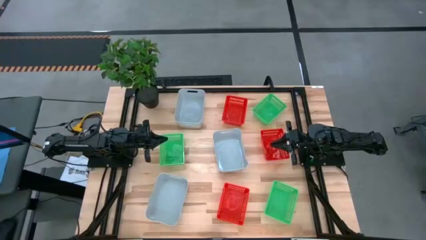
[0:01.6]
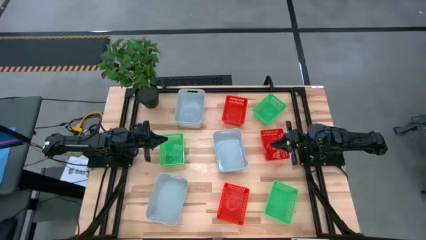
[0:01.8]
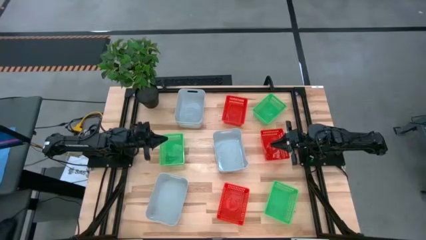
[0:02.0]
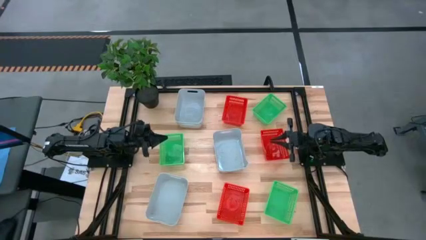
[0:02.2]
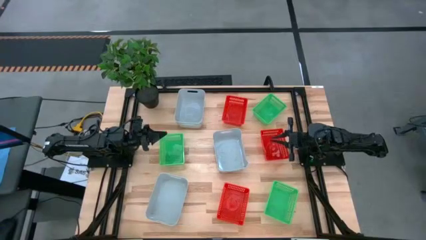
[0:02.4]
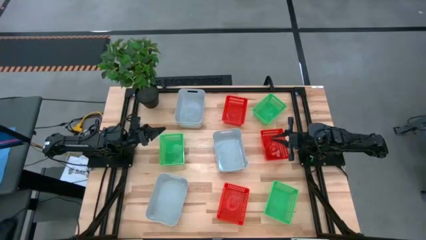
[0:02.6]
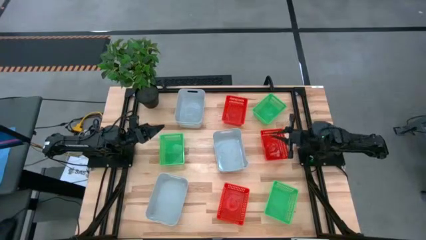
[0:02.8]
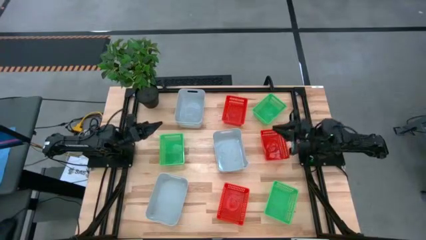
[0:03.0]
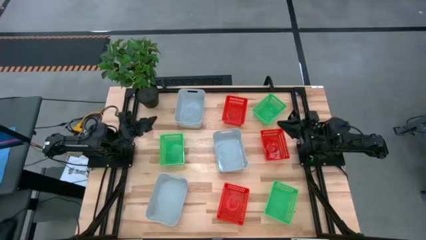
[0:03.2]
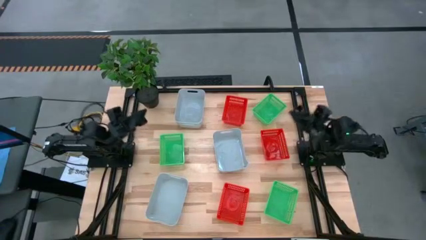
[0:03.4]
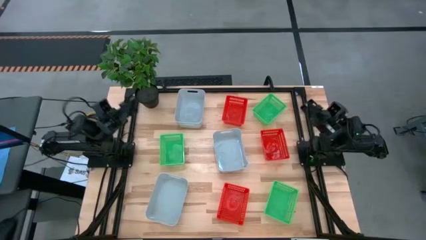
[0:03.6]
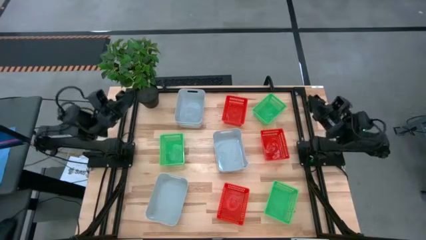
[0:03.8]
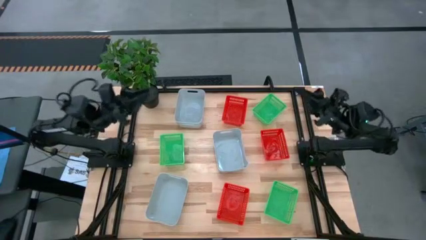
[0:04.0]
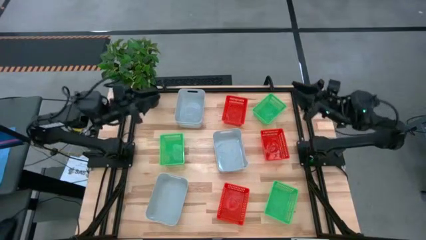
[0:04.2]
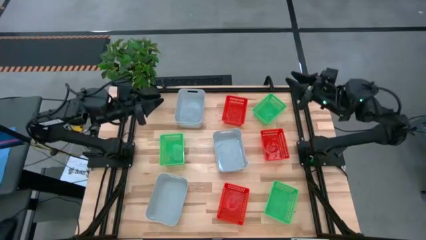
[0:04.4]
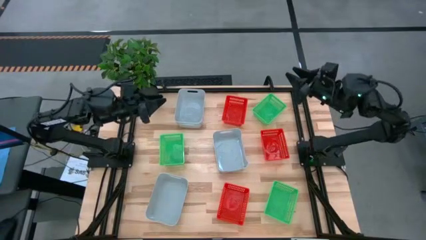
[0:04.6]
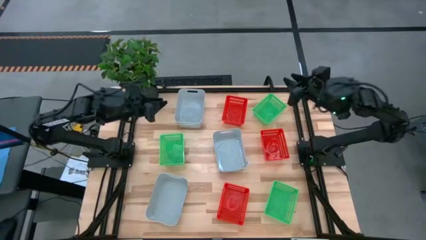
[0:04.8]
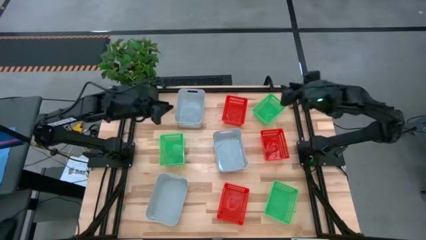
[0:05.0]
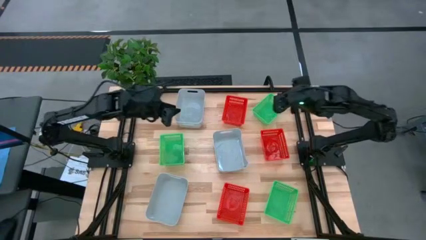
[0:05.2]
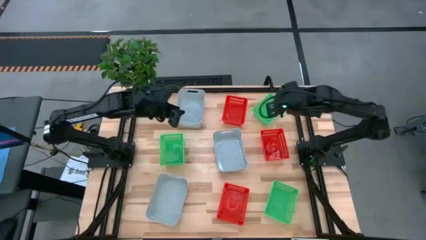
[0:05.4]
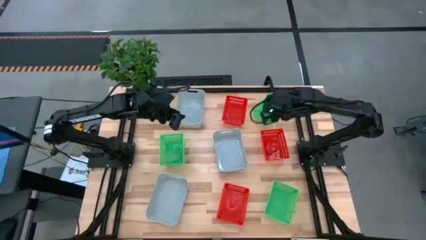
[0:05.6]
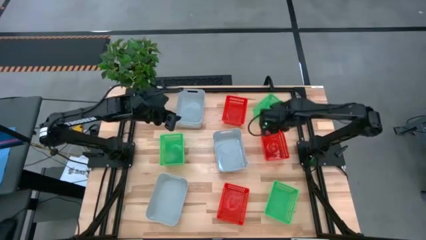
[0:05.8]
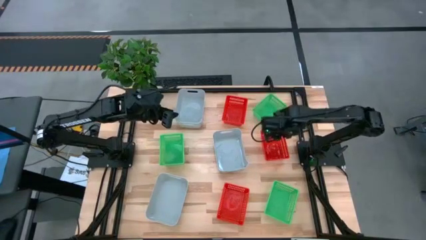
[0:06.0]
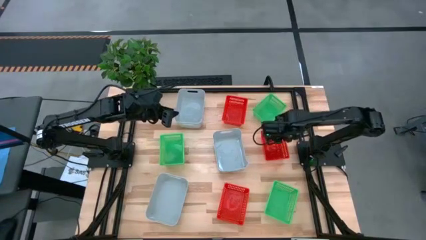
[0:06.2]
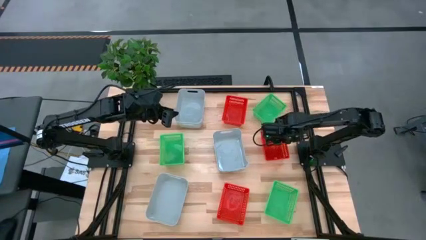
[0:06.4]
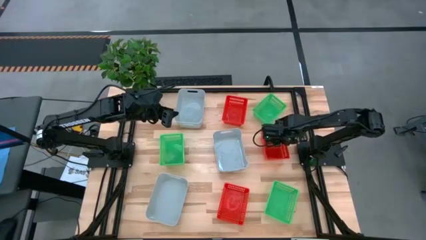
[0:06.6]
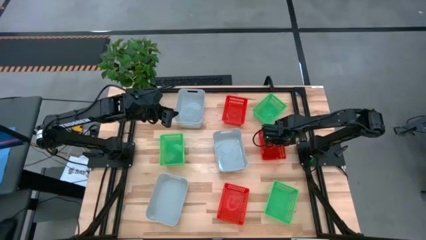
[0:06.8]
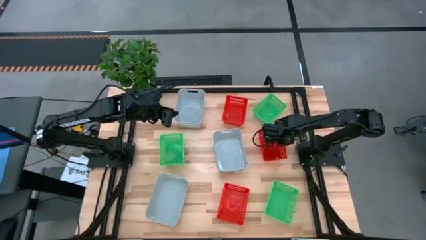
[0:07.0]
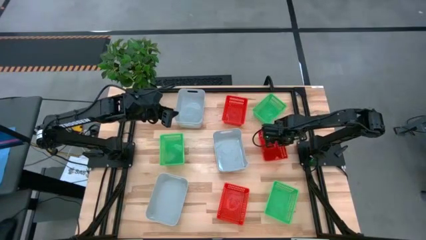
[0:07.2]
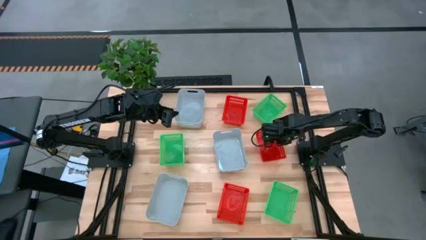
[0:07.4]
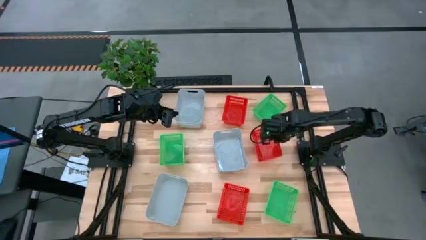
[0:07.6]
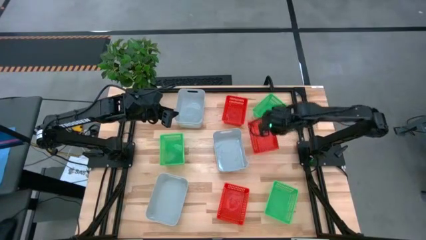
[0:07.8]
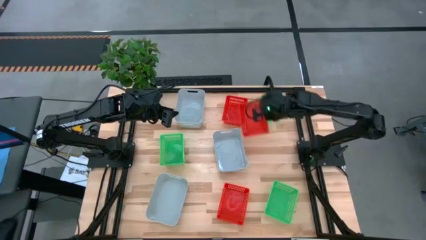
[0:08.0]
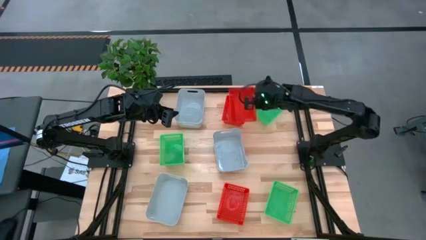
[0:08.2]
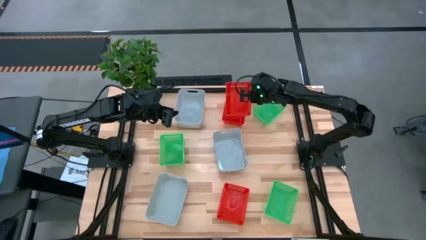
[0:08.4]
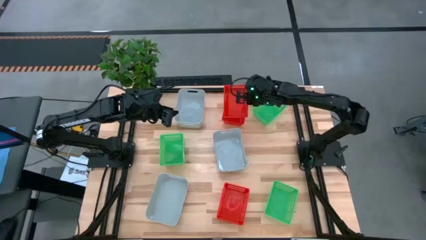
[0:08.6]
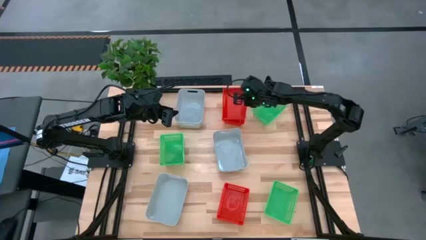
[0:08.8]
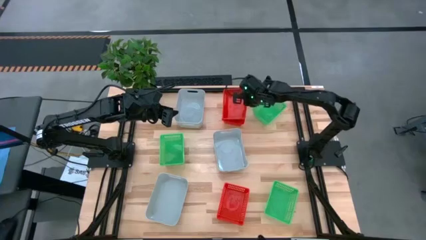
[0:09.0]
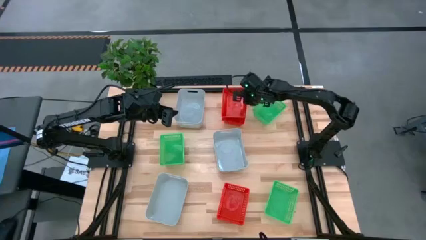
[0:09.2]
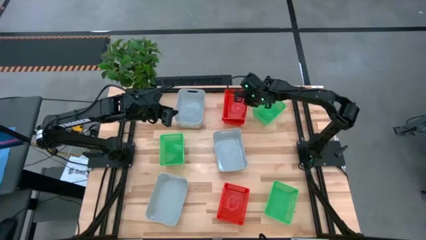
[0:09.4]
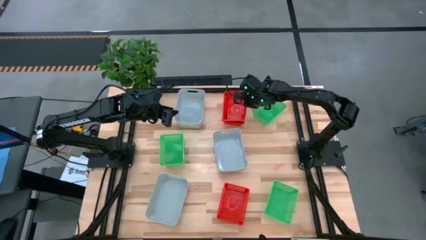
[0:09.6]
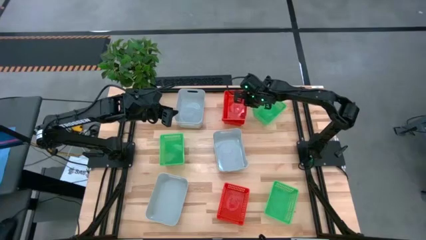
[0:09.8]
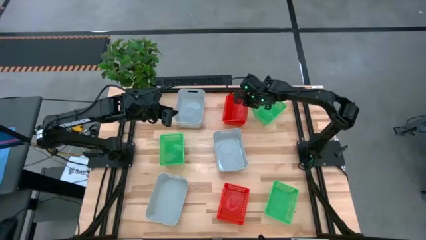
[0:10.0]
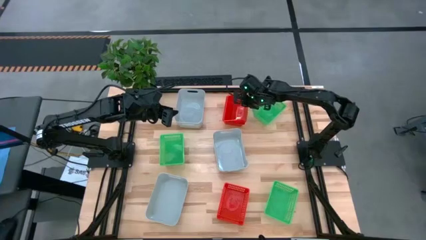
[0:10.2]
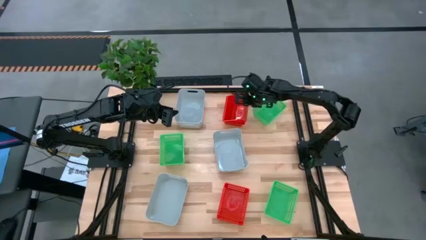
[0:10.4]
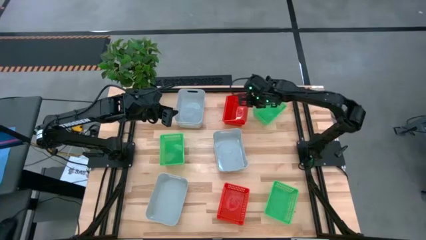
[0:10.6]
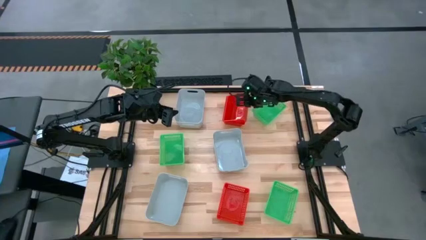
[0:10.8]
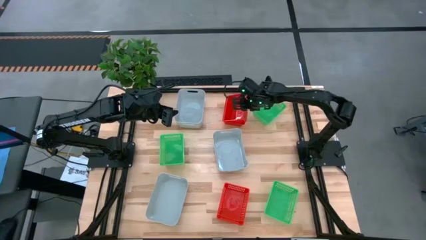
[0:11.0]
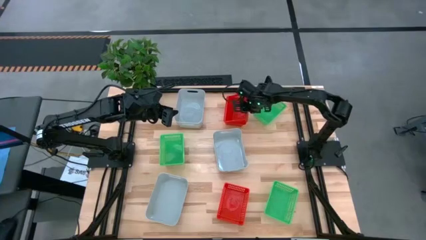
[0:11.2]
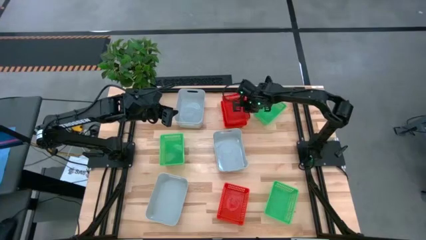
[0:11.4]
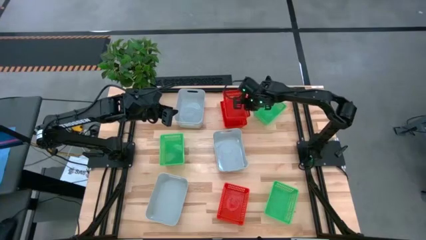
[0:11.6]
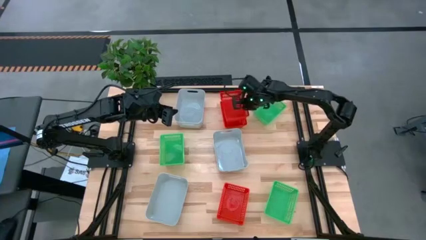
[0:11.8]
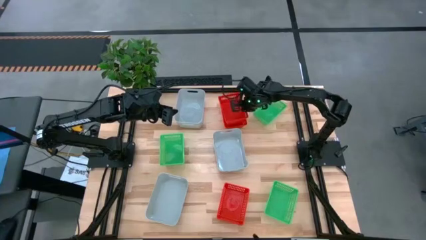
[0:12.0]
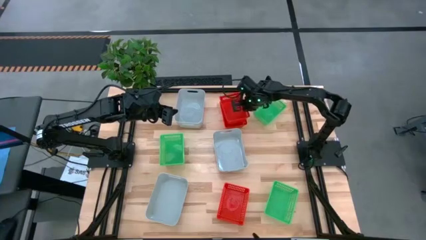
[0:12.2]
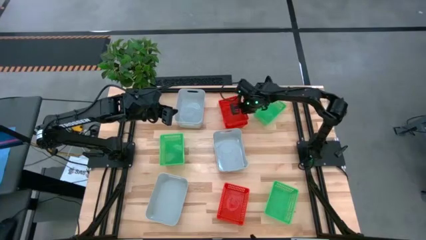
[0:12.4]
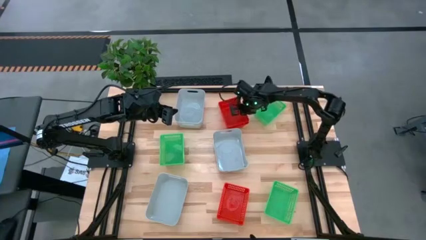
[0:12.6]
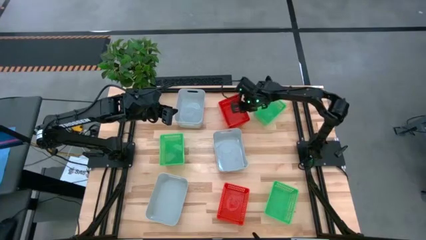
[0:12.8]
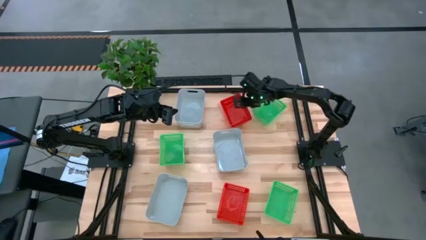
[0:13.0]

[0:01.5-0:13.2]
Stack the middle right red bin on the top red bin

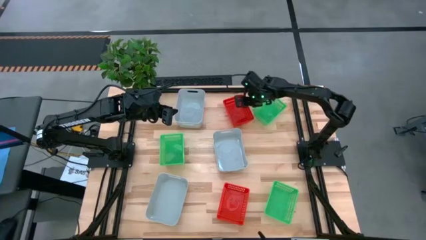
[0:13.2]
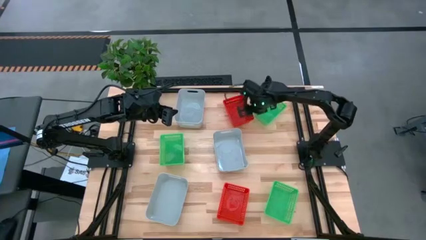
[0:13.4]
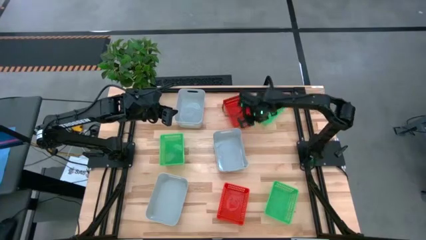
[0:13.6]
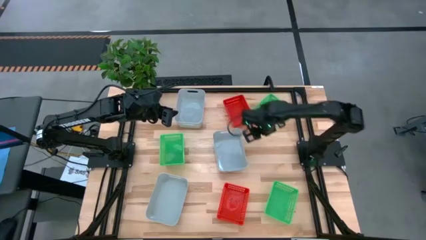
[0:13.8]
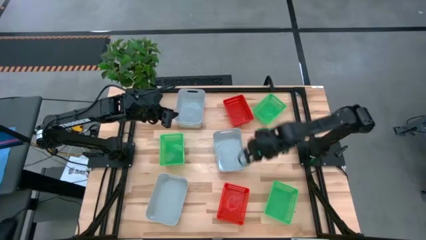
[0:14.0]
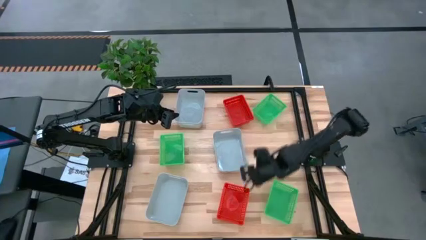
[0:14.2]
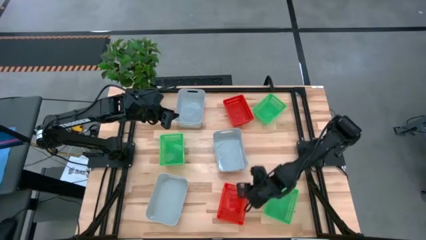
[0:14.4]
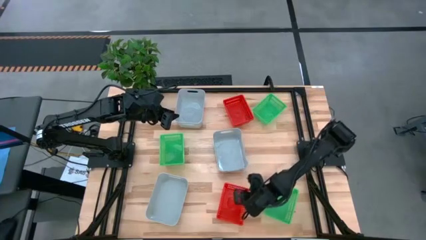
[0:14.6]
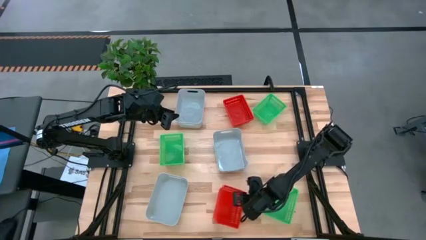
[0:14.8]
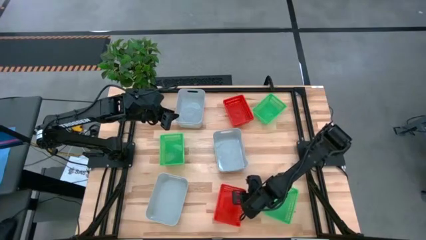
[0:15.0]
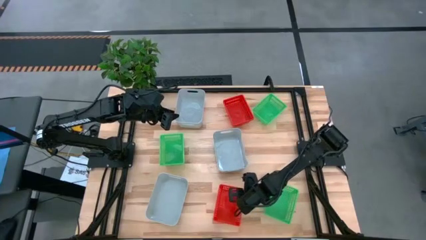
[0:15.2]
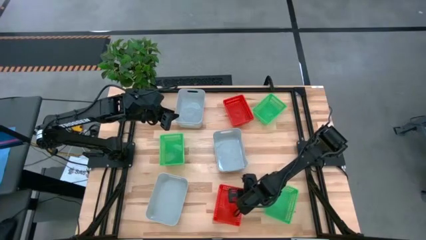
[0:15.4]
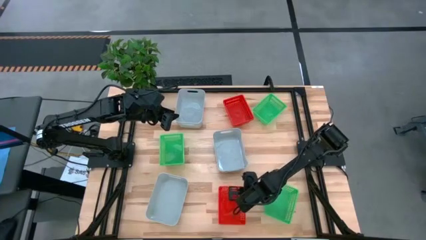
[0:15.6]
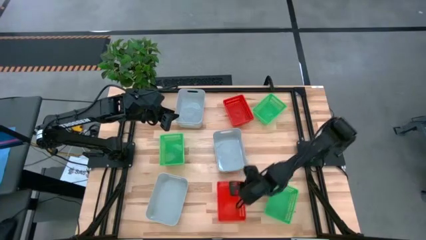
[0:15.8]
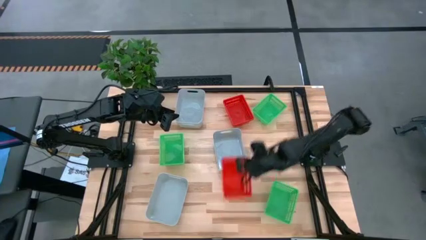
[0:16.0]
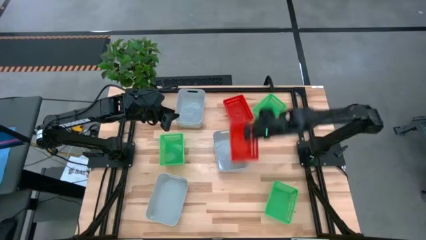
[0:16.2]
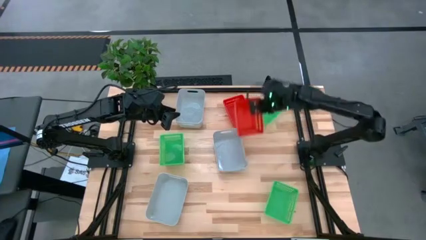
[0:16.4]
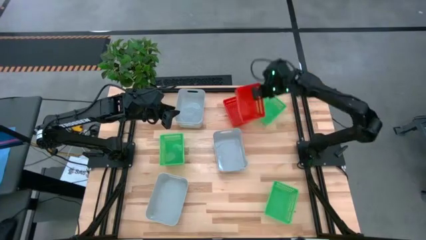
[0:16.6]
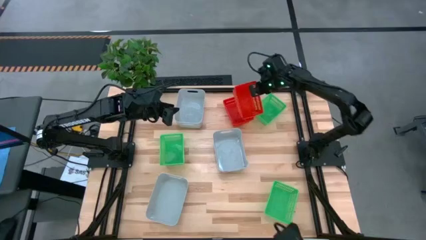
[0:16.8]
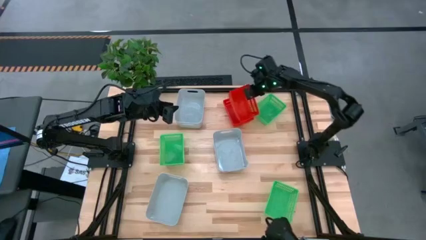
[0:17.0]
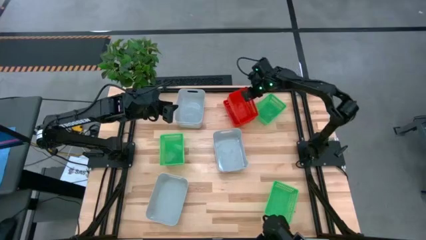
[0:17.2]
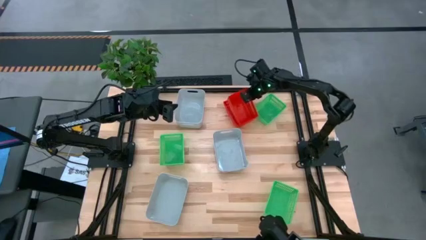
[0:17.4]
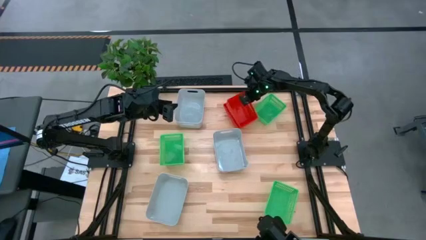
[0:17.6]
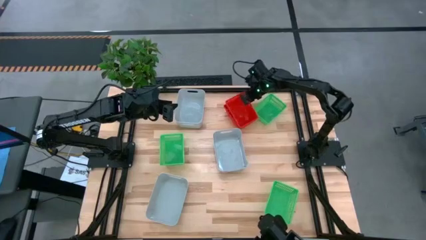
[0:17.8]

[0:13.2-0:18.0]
Stack the red bin on the red bins
